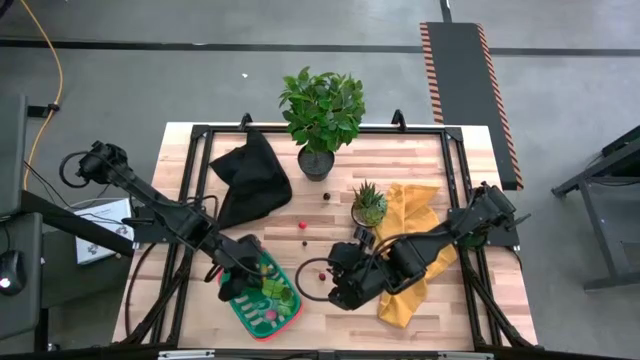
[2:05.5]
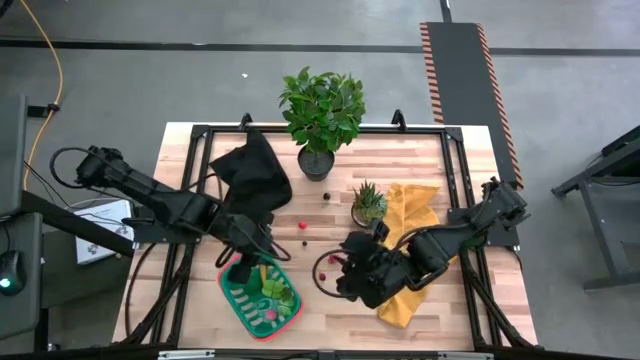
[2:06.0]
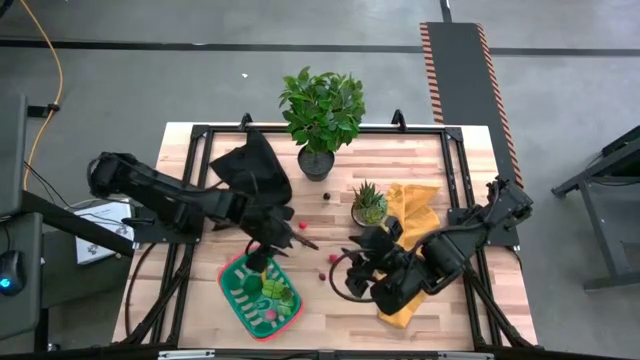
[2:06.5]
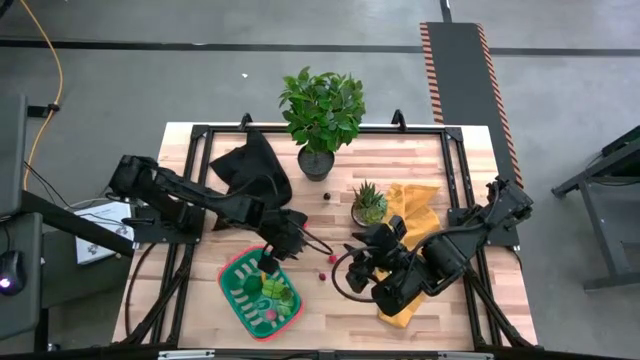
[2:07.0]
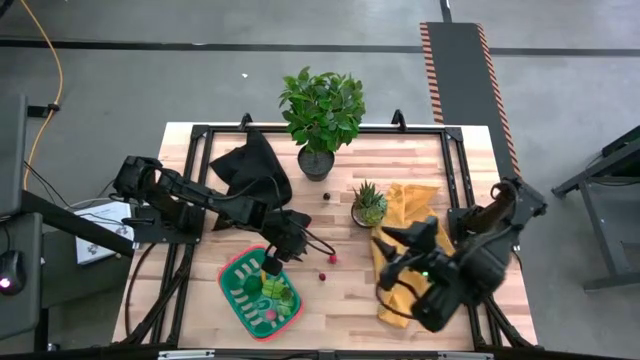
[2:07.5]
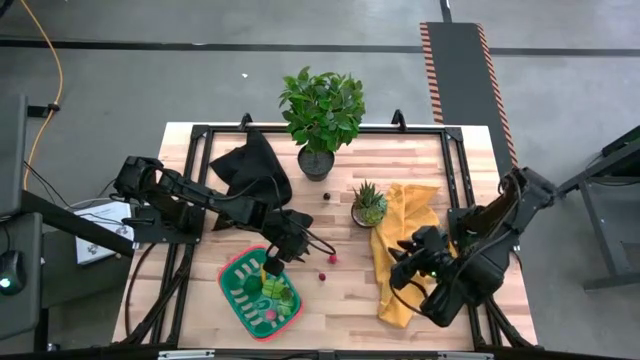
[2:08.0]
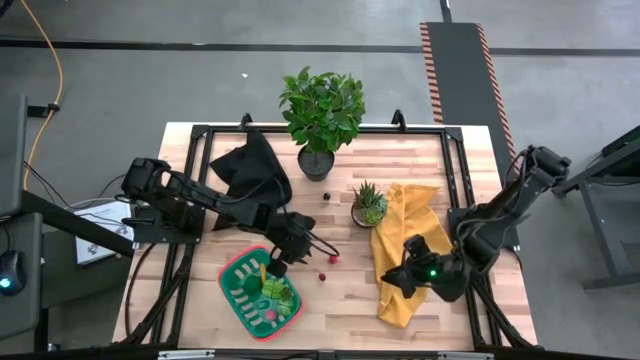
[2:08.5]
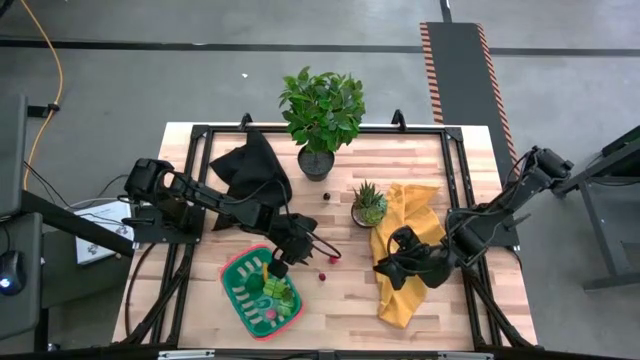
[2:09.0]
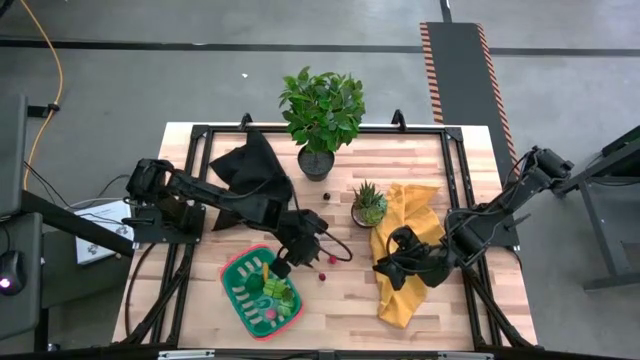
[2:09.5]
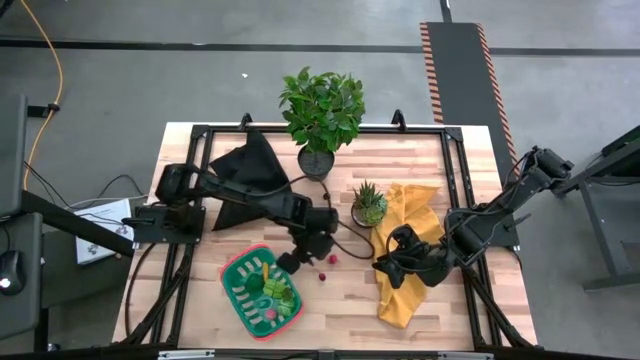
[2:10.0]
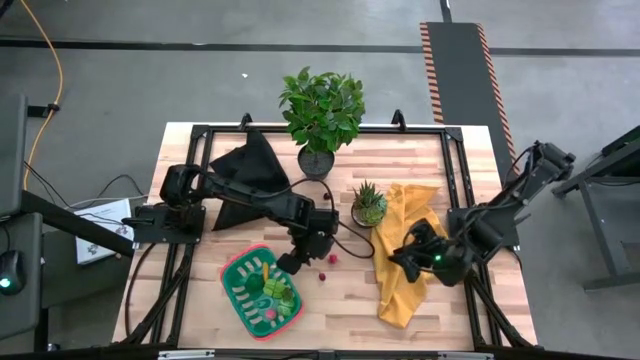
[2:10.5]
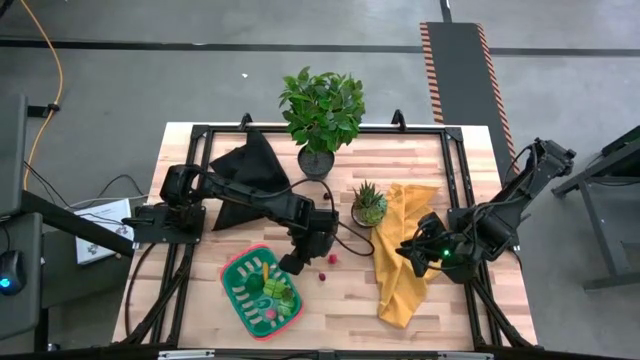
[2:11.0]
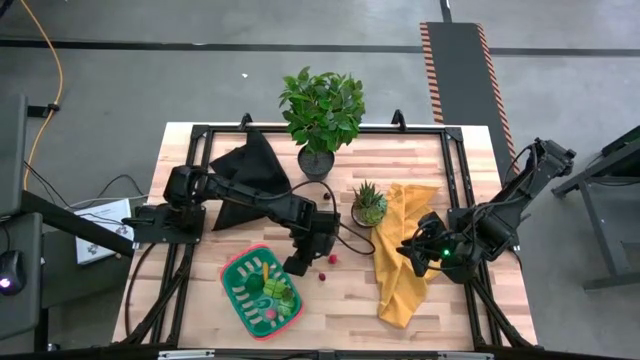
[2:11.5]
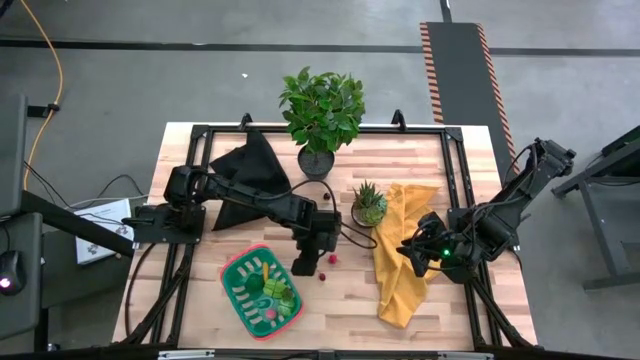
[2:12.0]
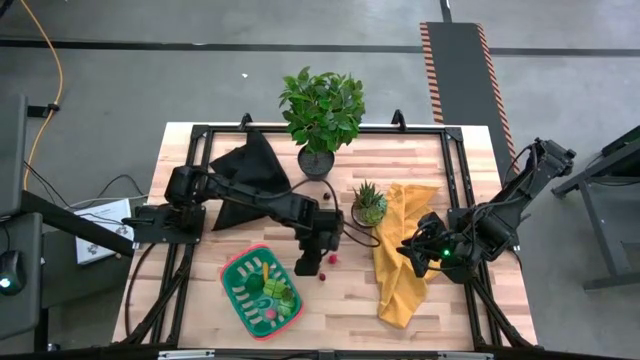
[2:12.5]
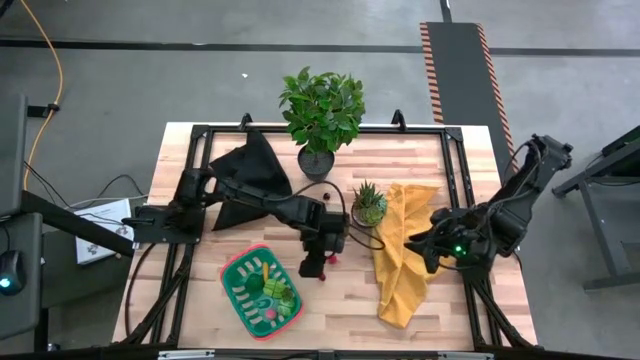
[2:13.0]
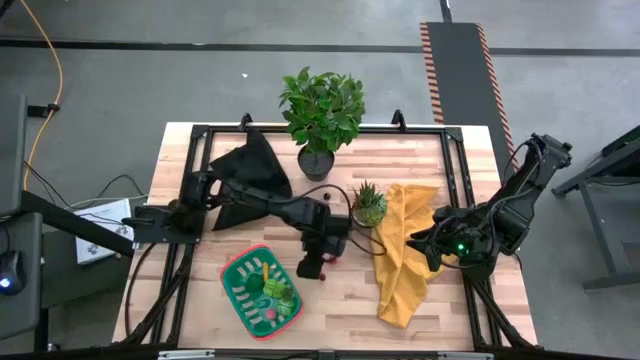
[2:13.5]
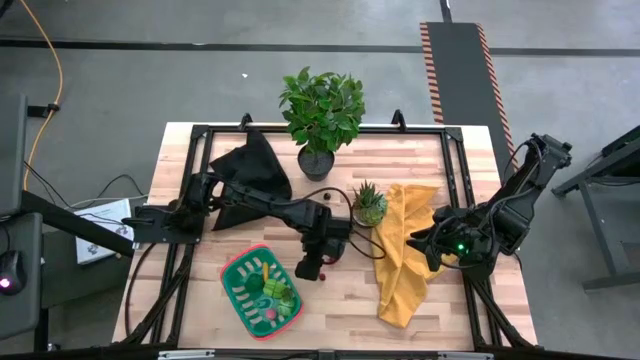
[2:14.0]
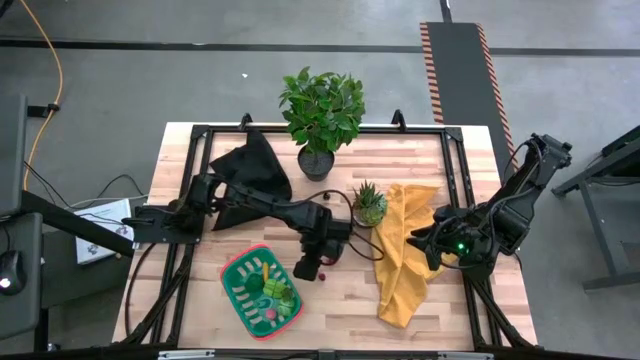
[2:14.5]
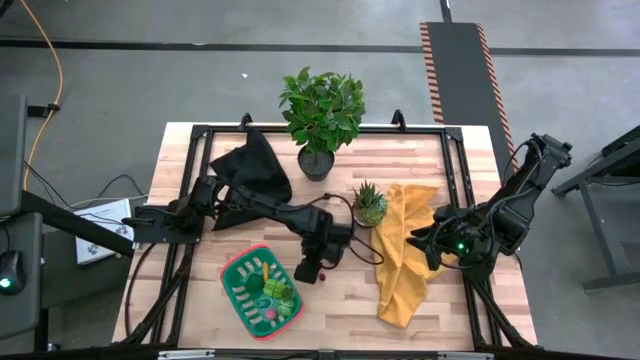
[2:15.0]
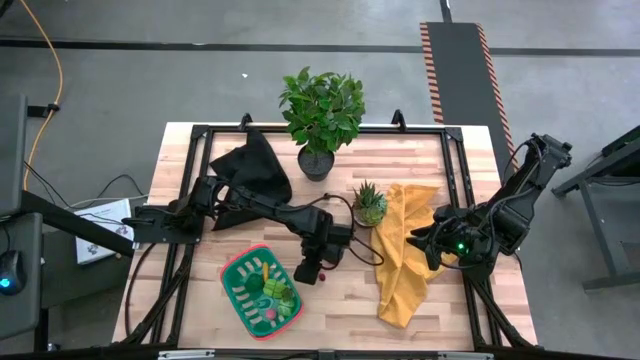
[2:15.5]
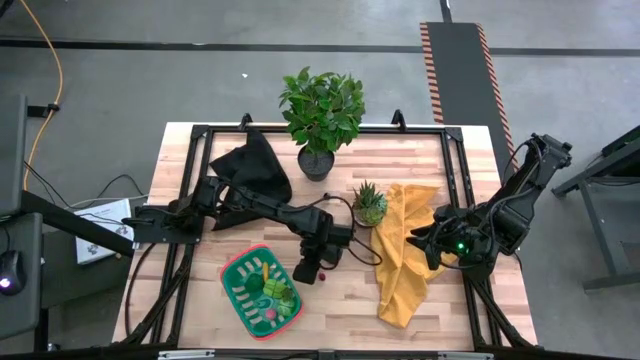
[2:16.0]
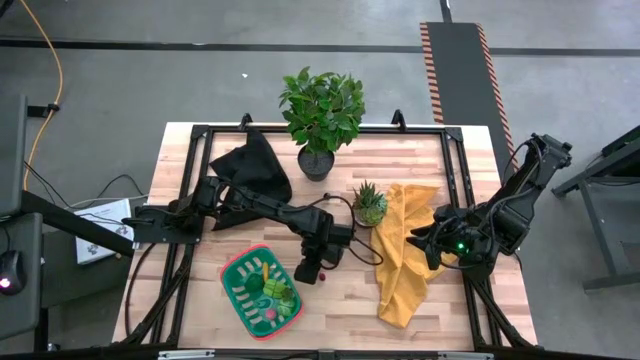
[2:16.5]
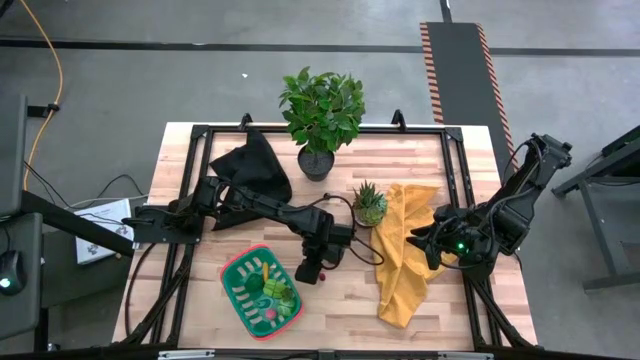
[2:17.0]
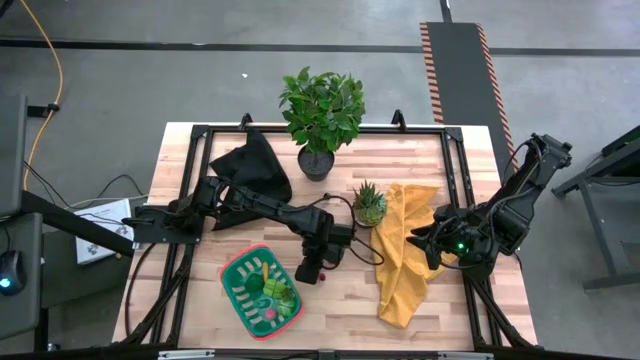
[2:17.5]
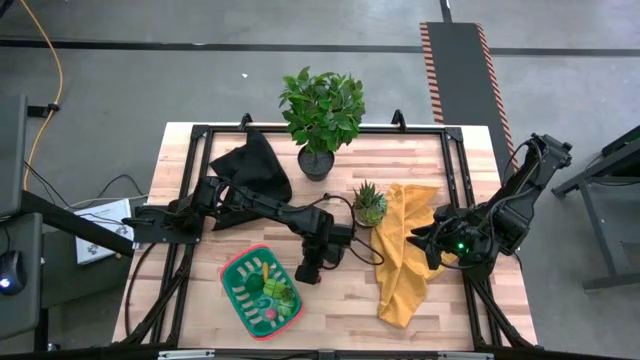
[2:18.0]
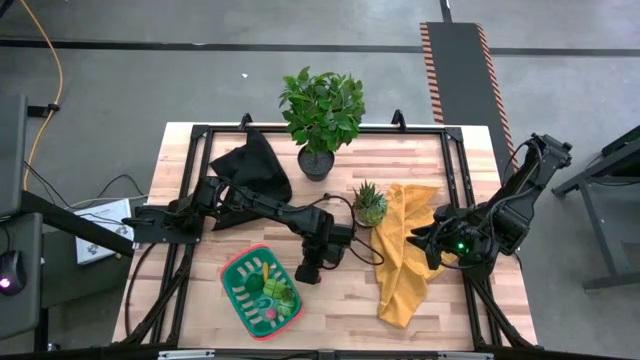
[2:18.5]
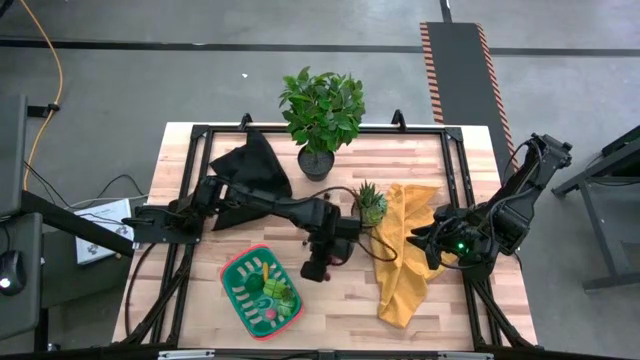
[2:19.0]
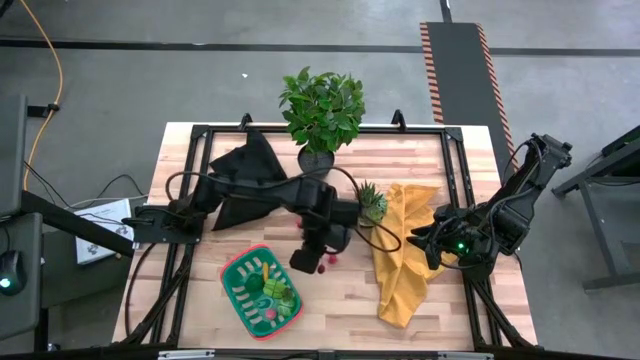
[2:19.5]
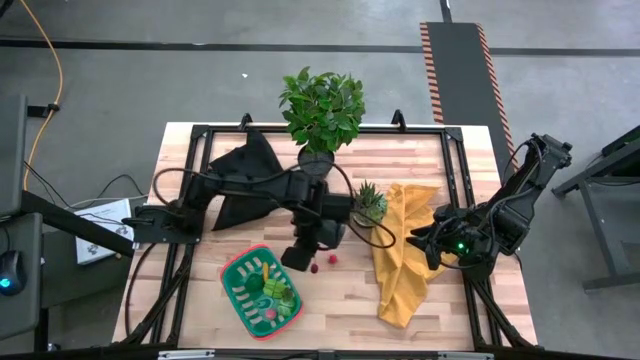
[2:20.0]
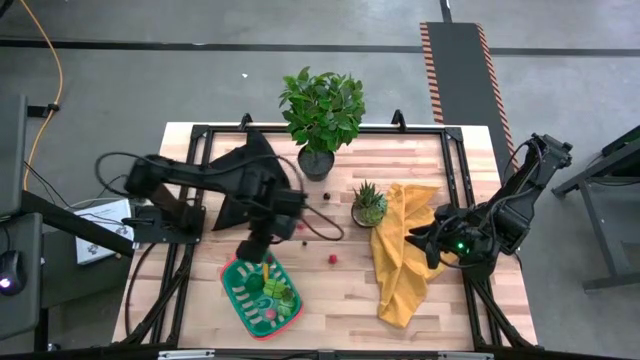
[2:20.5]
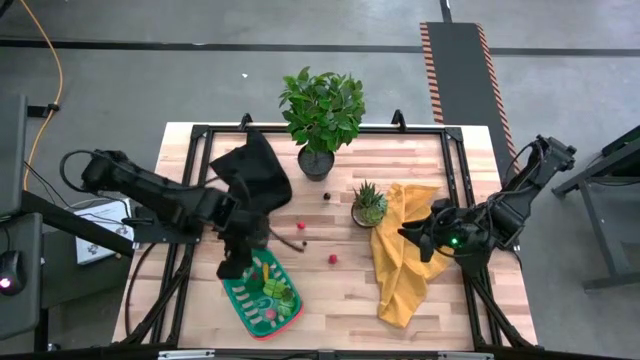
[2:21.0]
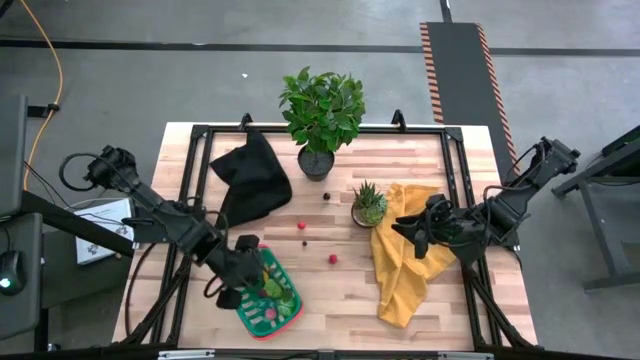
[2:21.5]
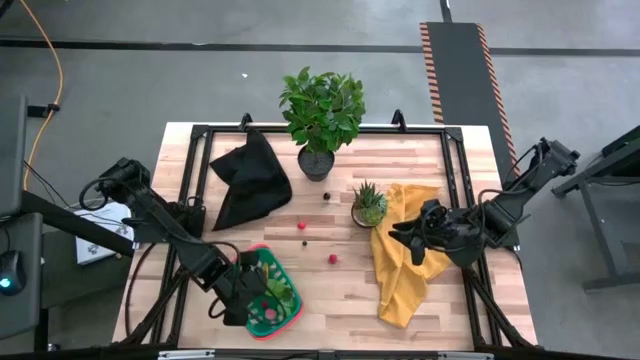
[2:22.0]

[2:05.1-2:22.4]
Task: Pick and placing Produce into tupperware
Put the bottom red cherry into the blue basket

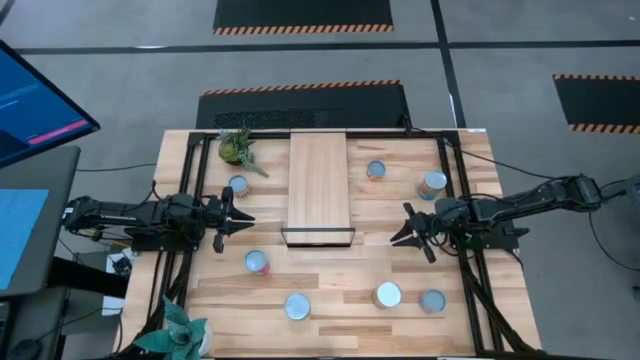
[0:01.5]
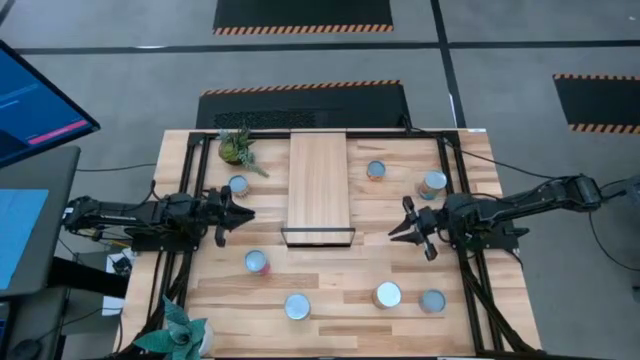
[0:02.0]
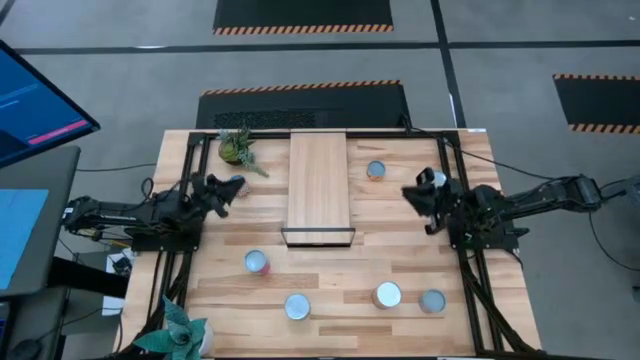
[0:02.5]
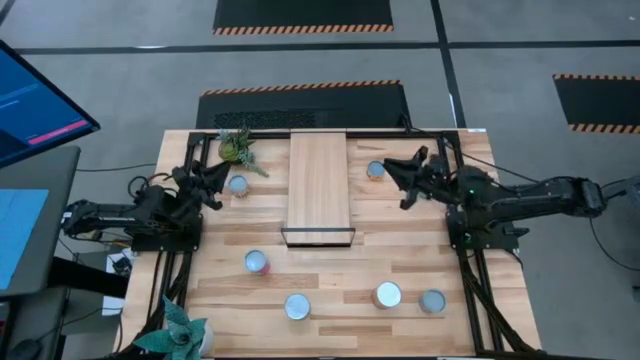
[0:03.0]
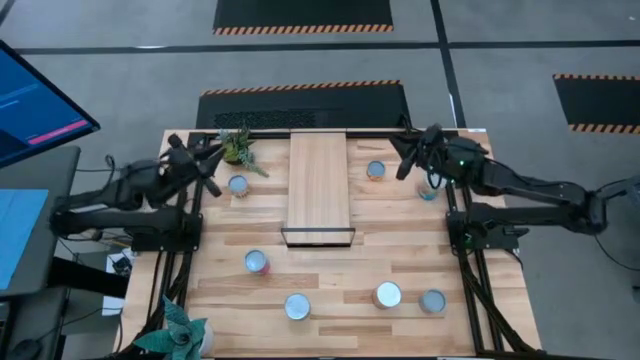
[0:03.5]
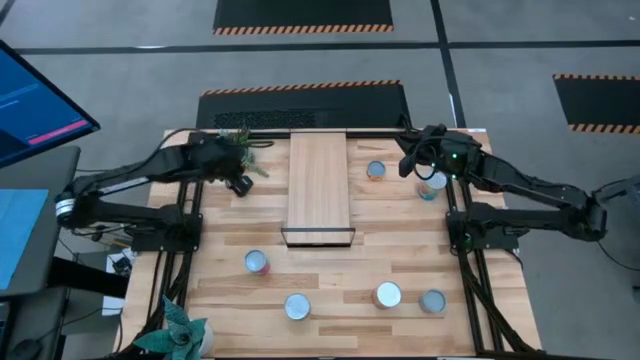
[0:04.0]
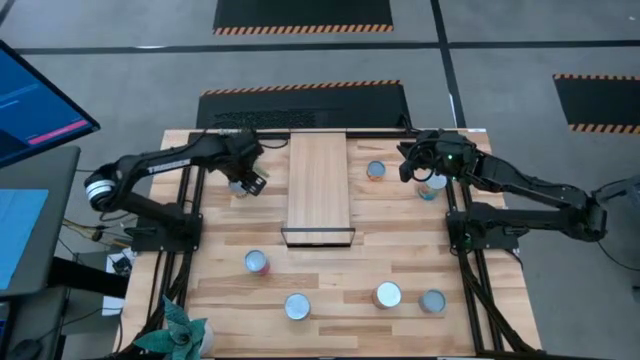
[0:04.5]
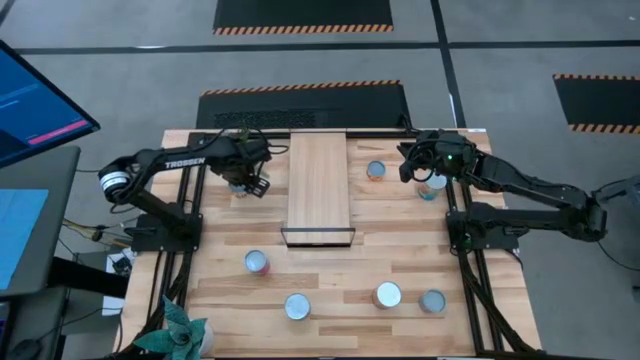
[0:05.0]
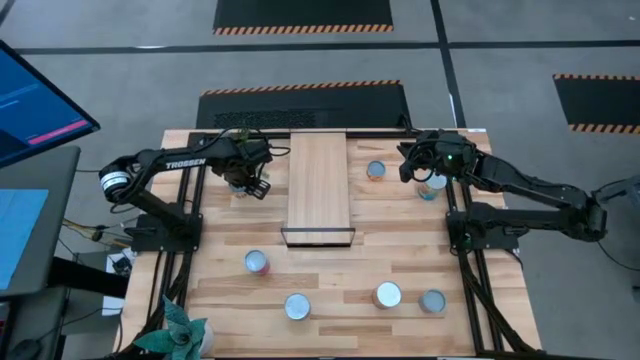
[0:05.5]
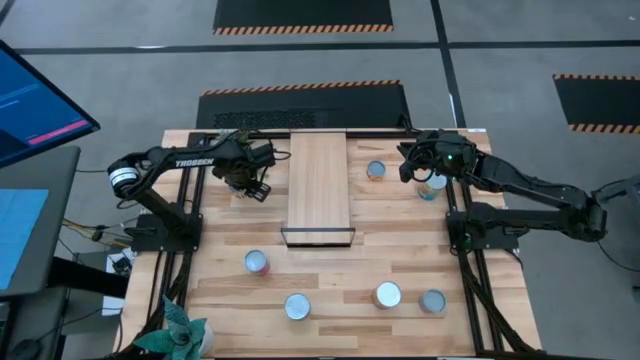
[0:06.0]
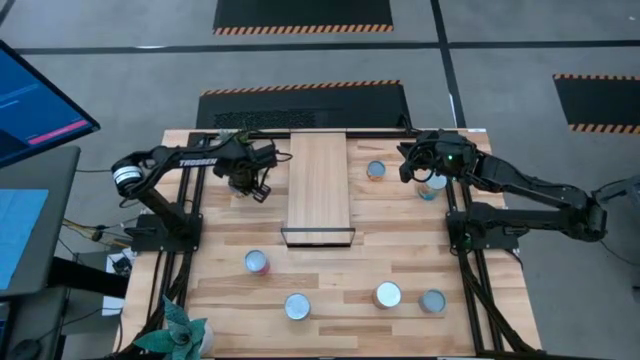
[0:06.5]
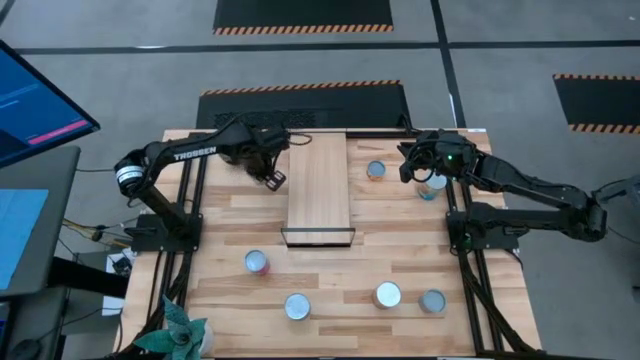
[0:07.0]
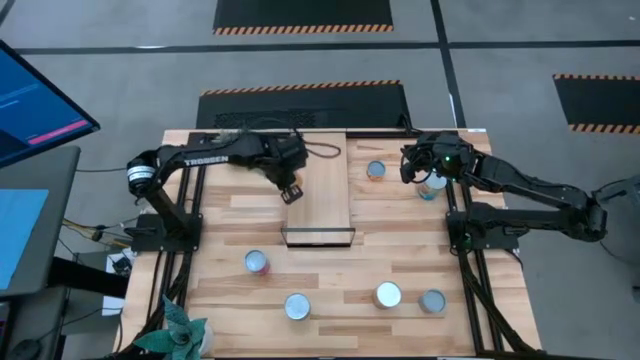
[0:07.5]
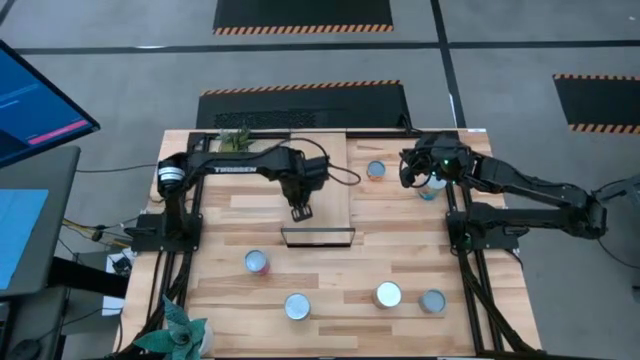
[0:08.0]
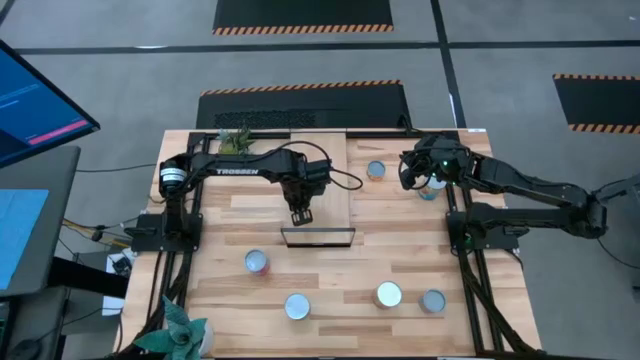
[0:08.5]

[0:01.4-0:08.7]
Task: Pick and place cans onto a shelf
Put the canned black beans on the shelf
